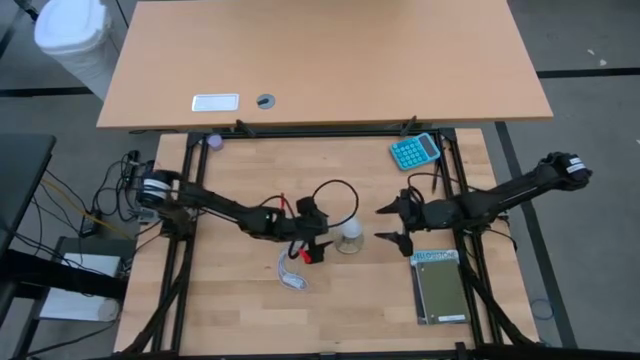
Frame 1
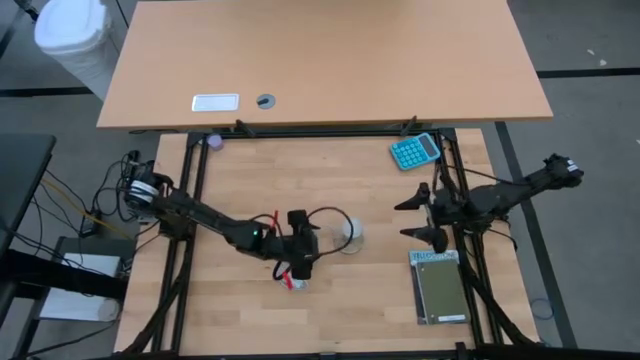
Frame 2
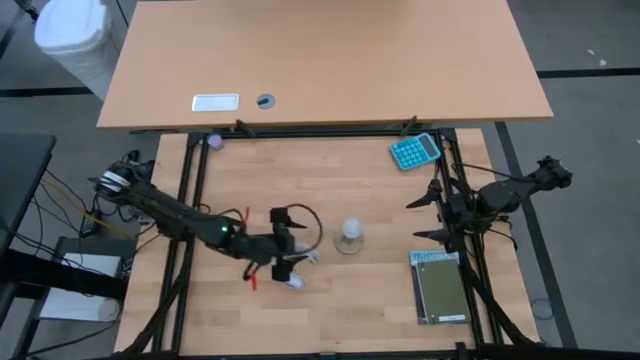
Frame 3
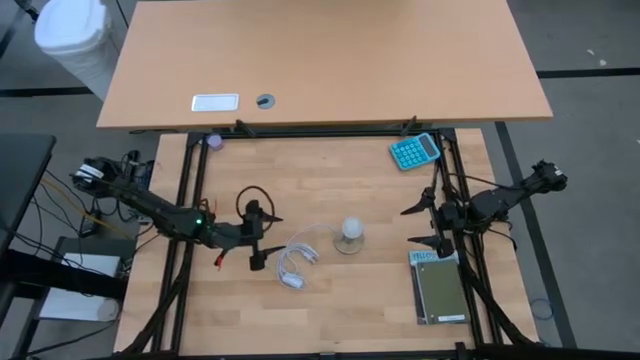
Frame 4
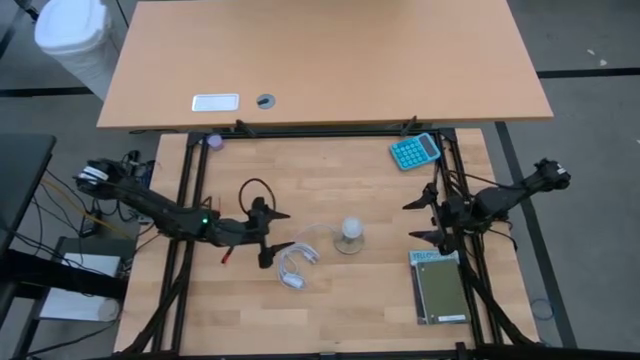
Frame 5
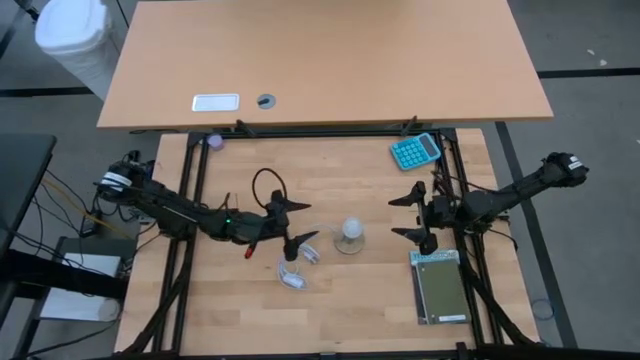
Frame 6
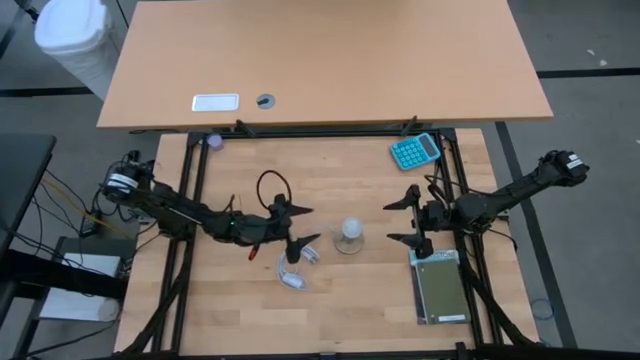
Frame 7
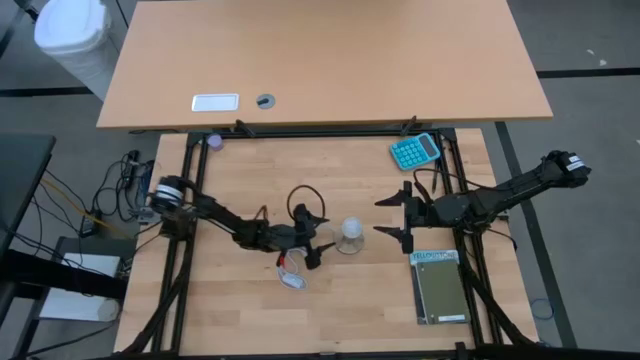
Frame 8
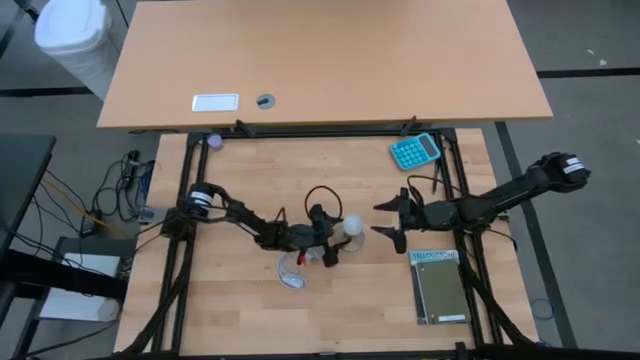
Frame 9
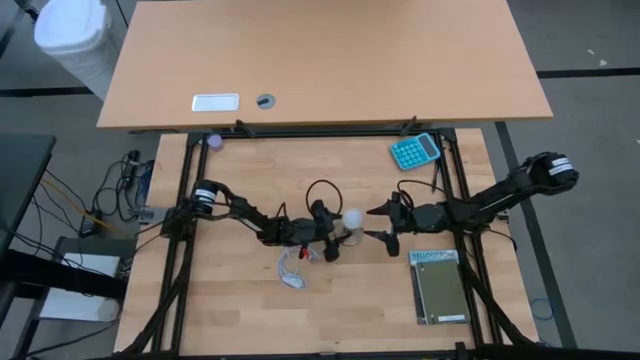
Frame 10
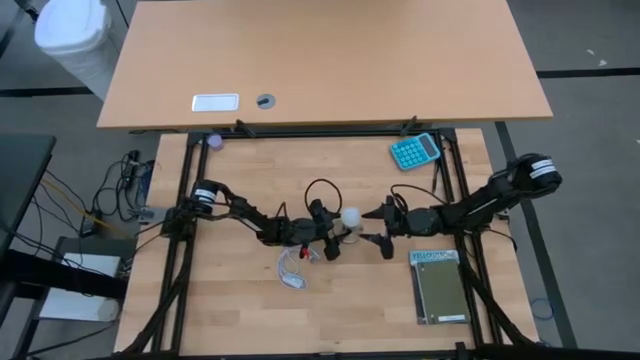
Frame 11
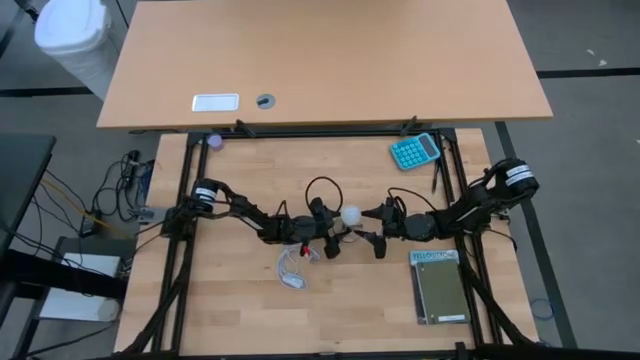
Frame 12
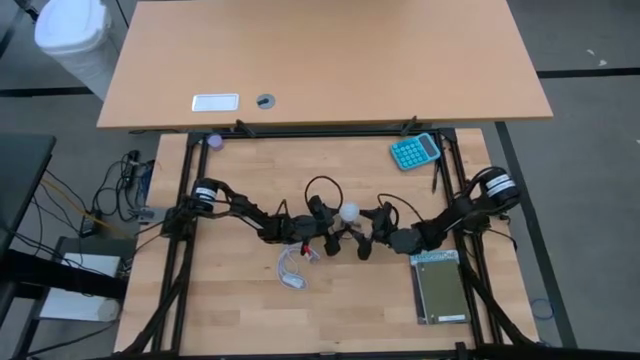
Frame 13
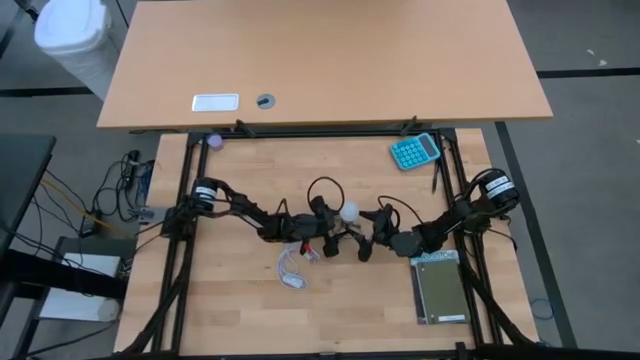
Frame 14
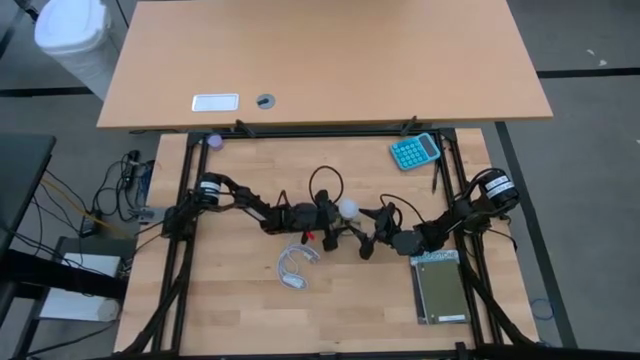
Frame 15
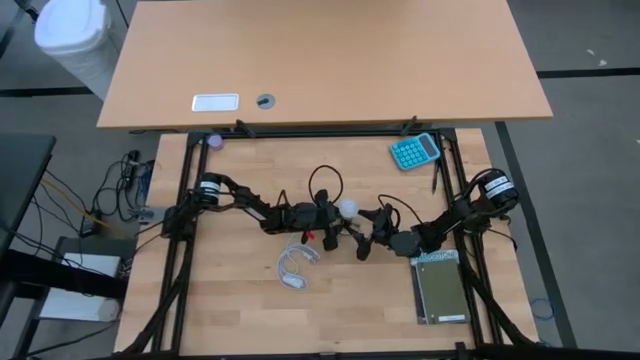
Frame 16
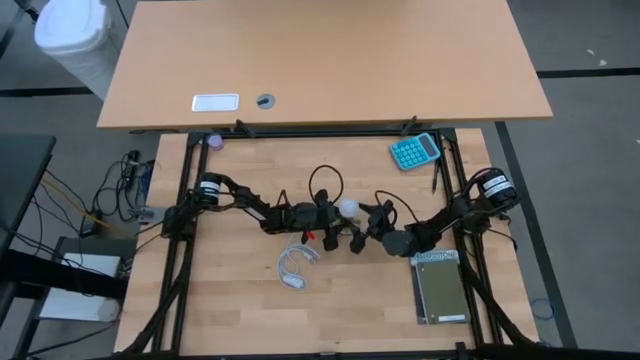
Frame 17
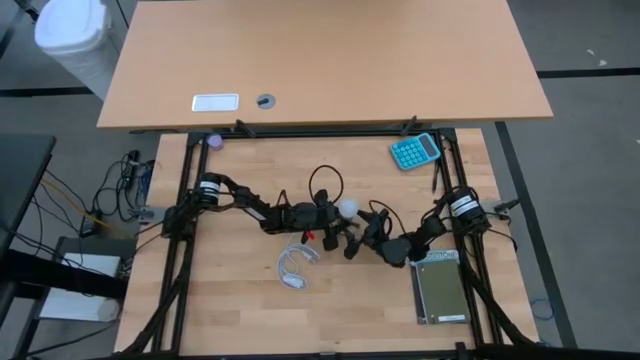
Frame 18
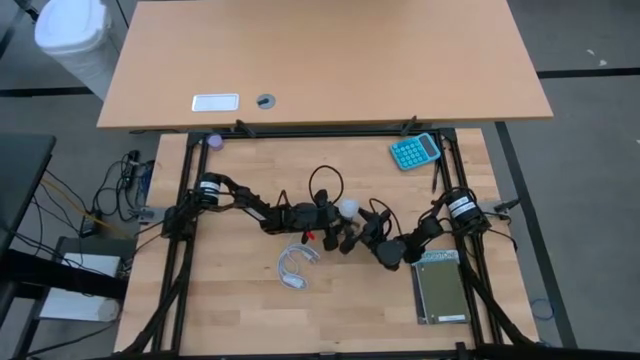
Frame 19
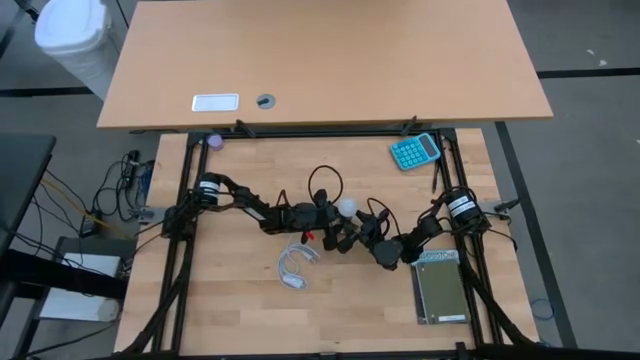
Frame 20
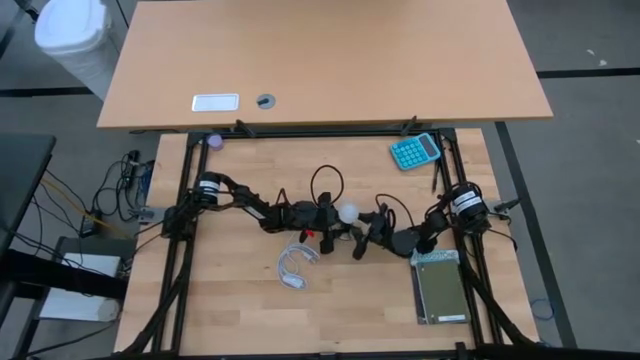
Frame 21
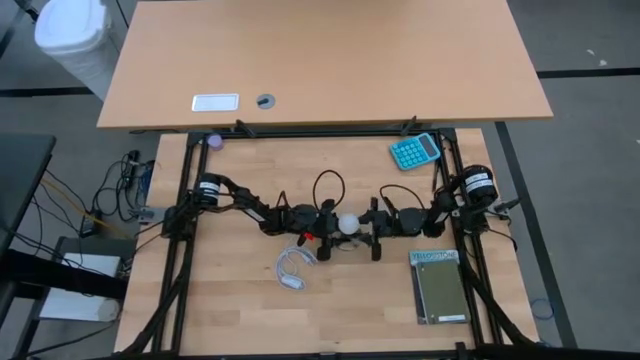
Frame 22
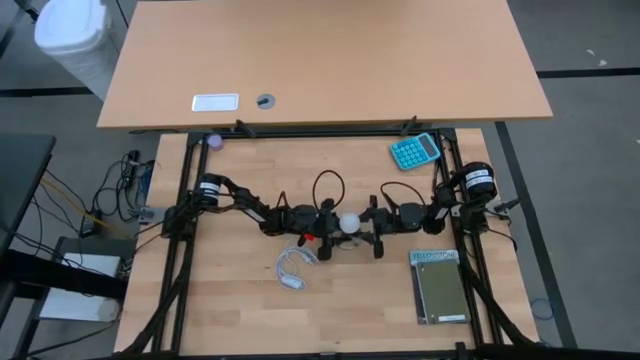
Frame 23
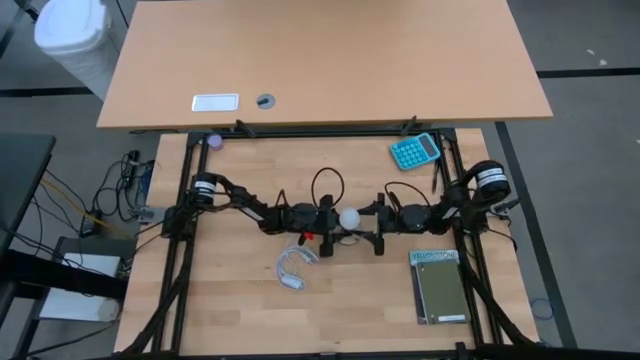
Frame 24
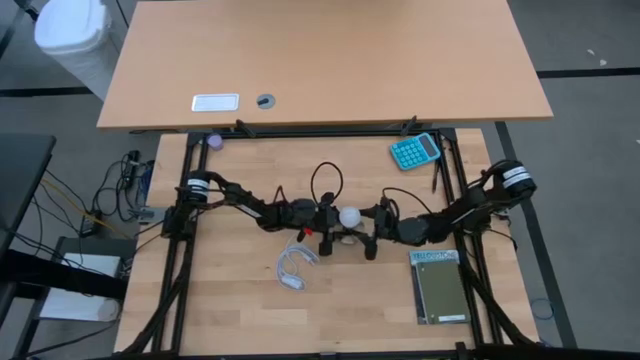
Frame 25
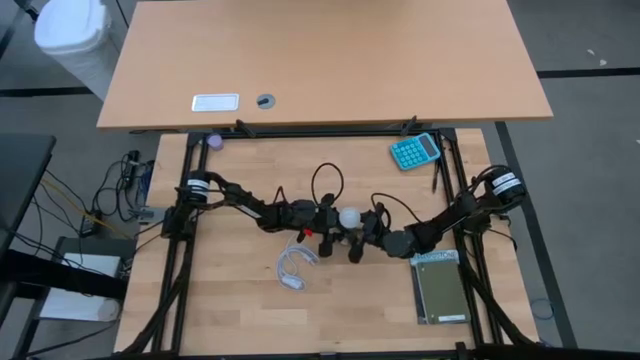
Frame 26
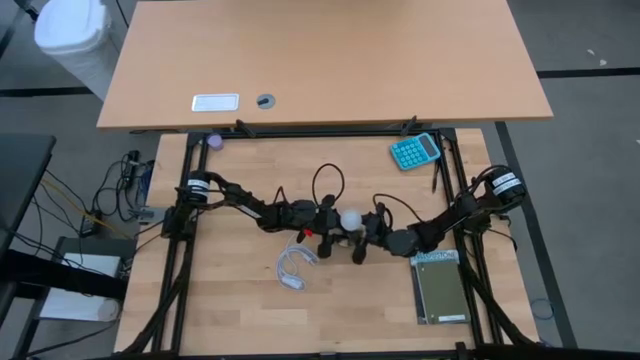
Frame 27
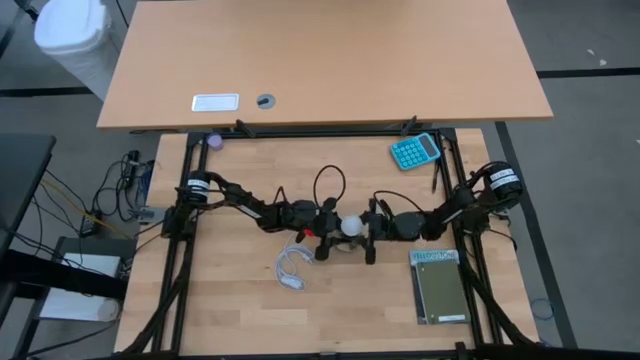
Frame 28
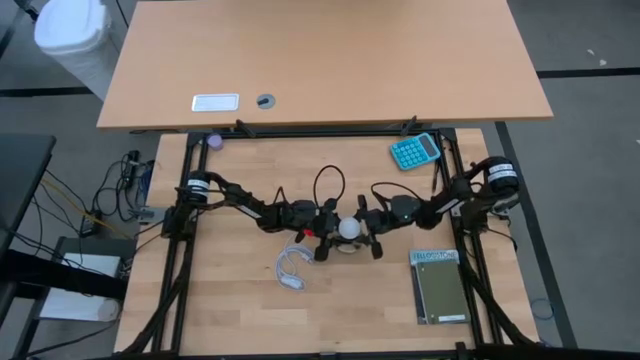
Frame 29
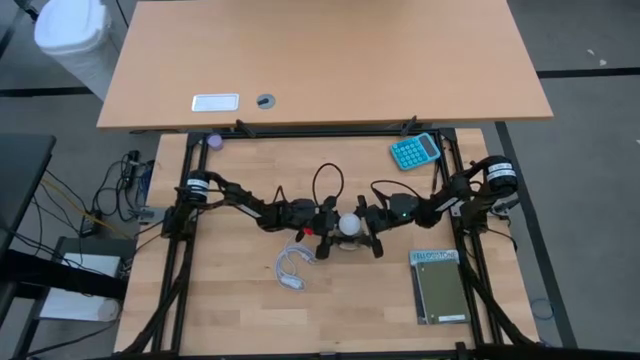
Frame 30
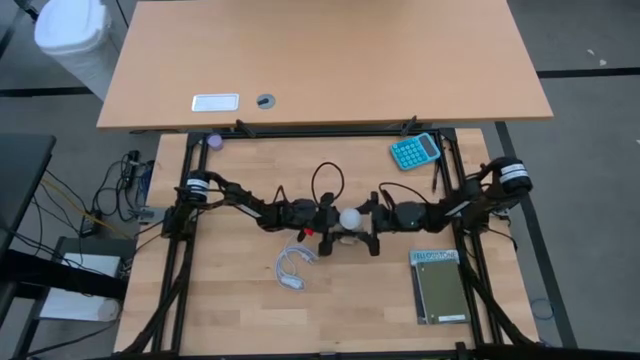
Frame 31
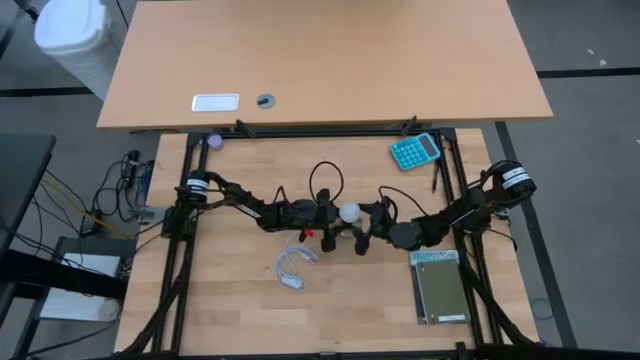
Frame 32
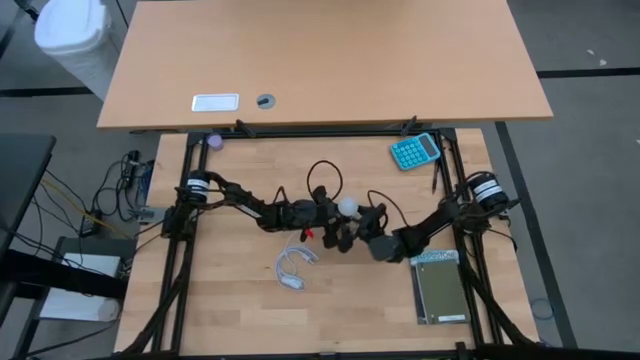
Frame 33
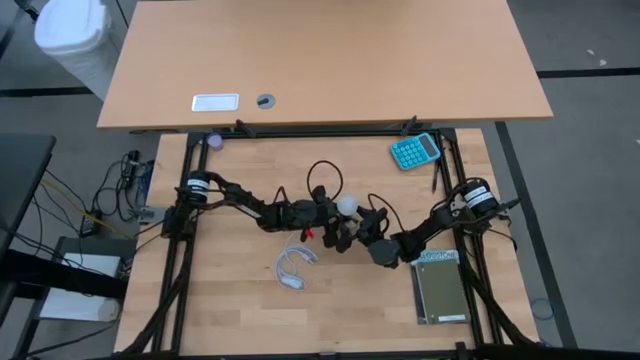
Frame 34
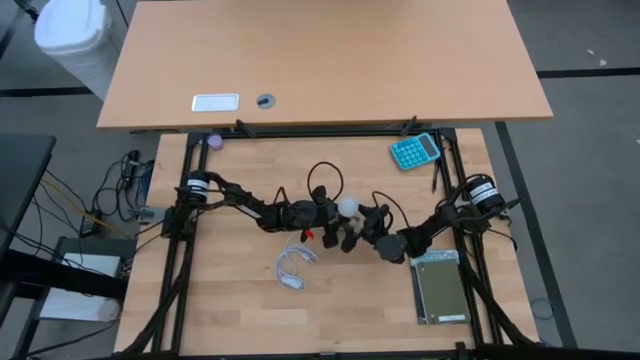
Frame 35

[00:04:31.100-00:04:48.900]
Task: Screw lightbulb
Remove the lightbulb from the socket
